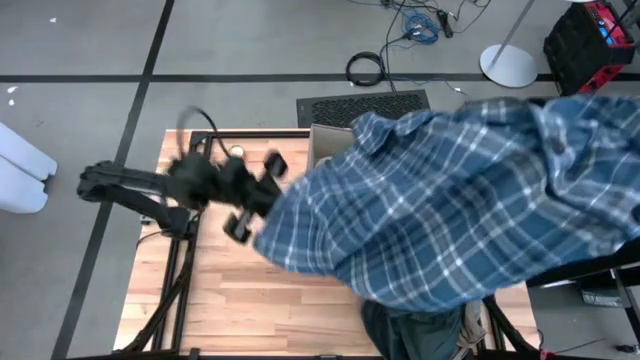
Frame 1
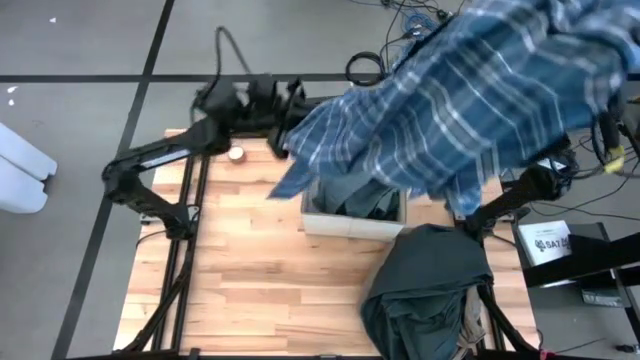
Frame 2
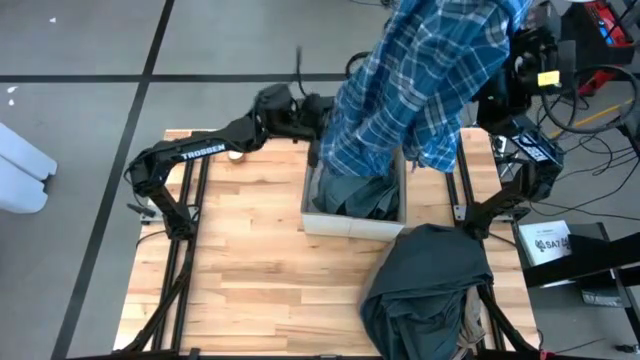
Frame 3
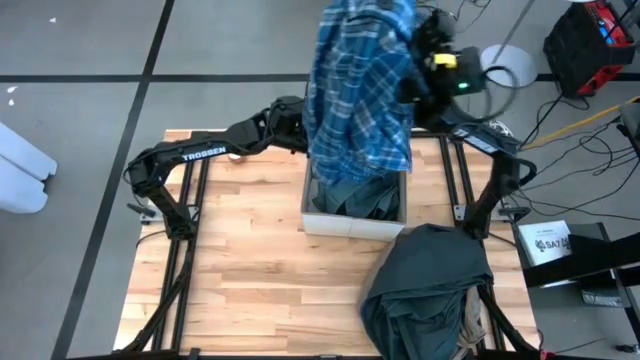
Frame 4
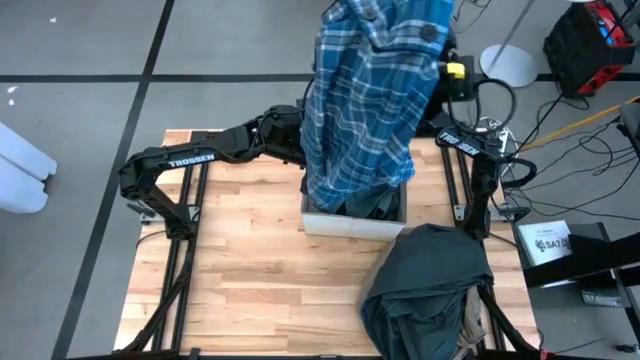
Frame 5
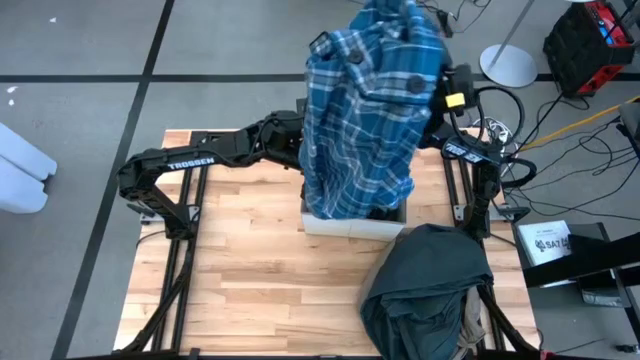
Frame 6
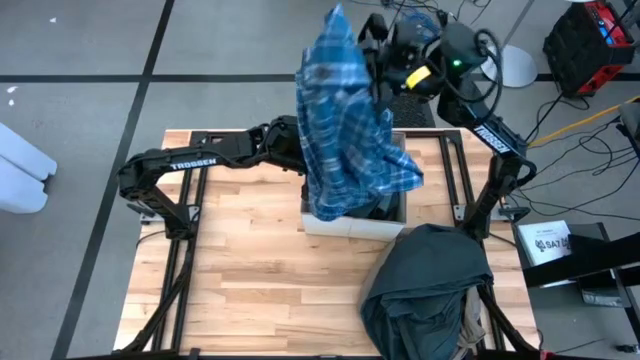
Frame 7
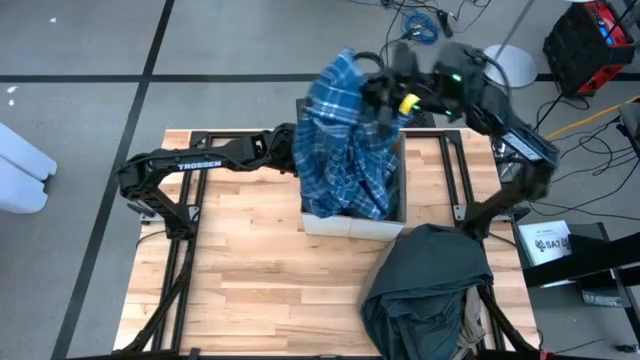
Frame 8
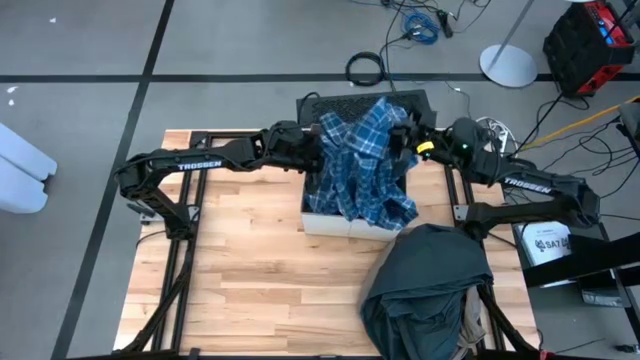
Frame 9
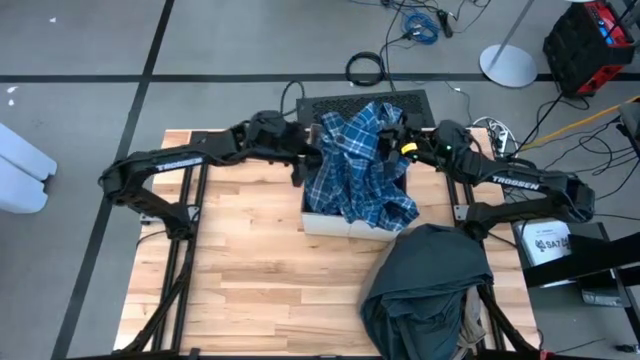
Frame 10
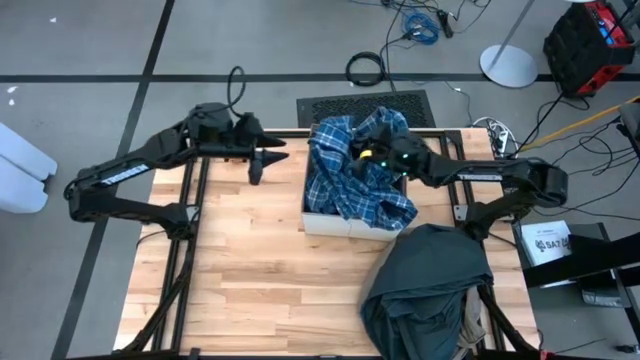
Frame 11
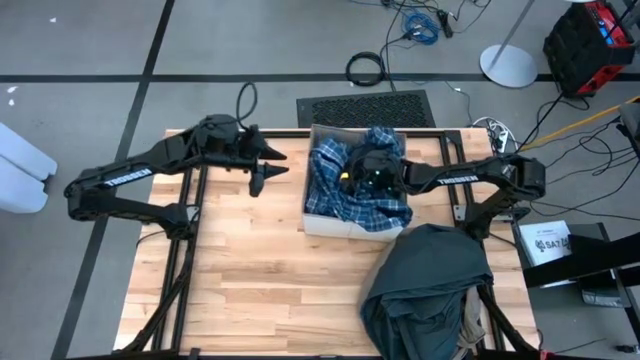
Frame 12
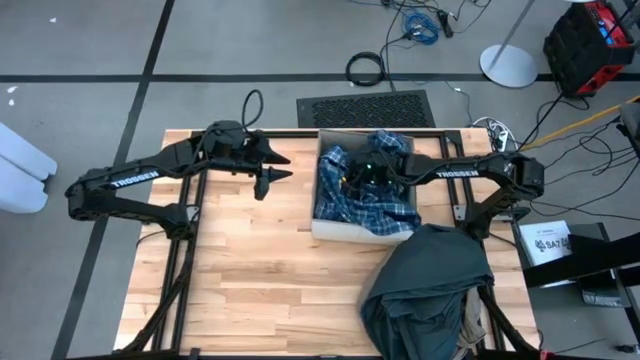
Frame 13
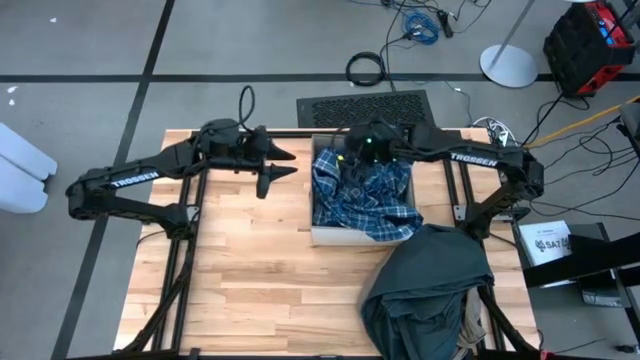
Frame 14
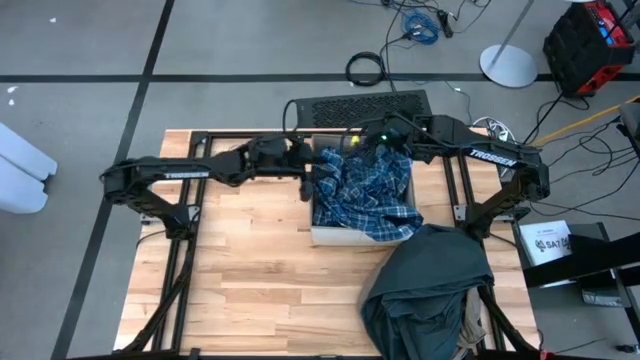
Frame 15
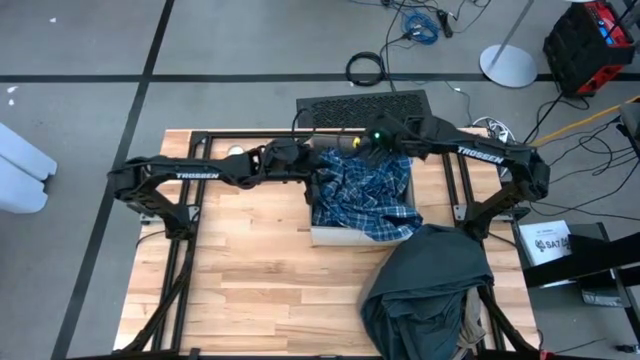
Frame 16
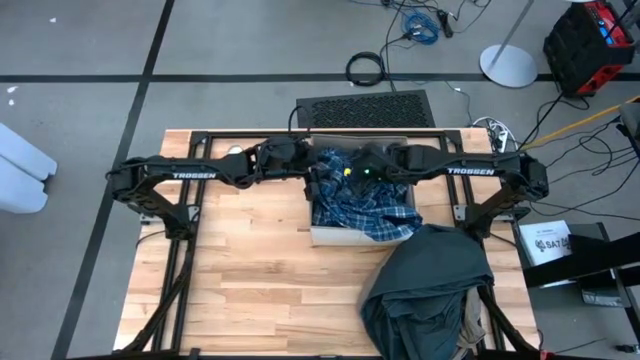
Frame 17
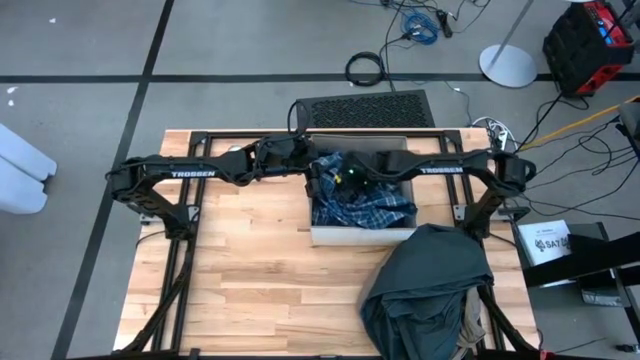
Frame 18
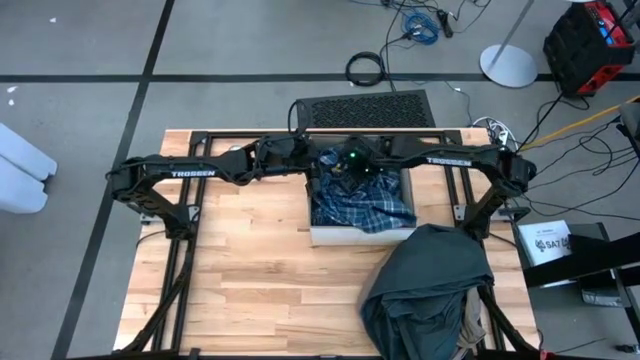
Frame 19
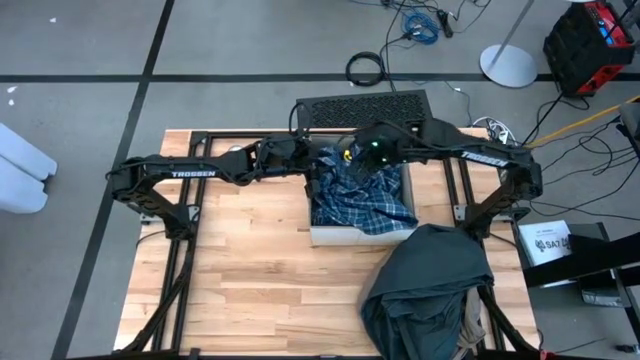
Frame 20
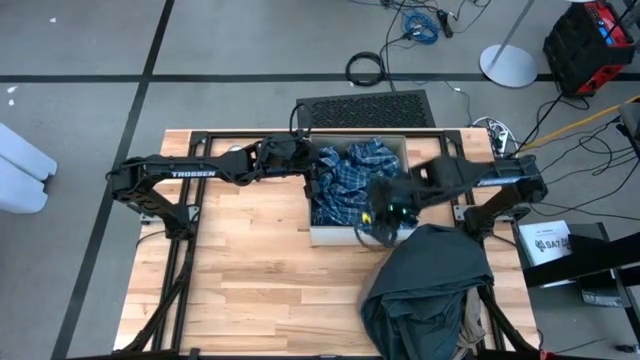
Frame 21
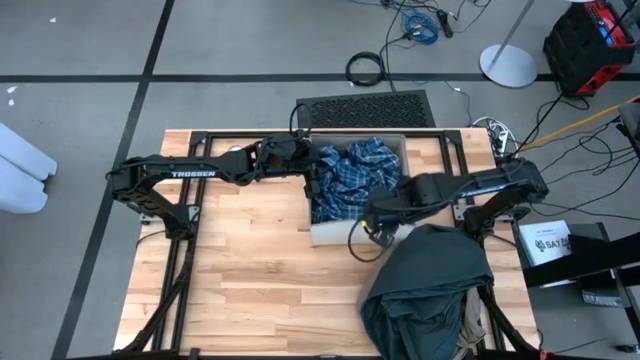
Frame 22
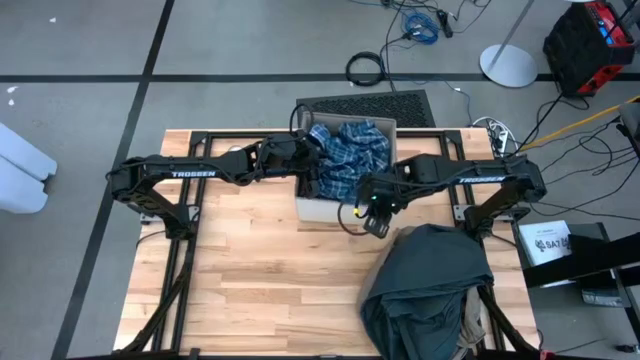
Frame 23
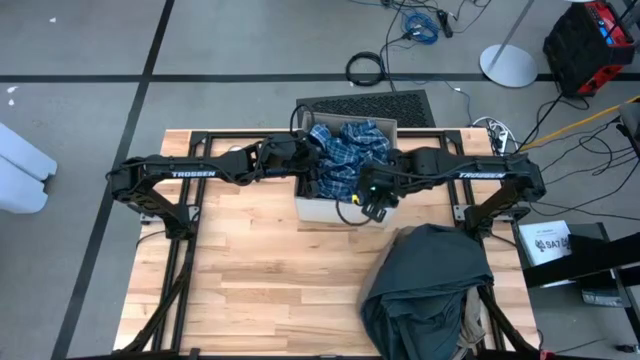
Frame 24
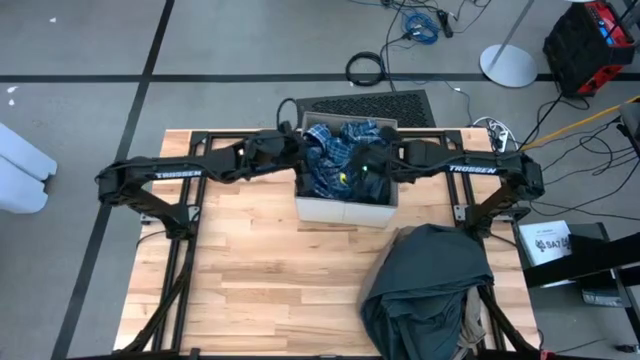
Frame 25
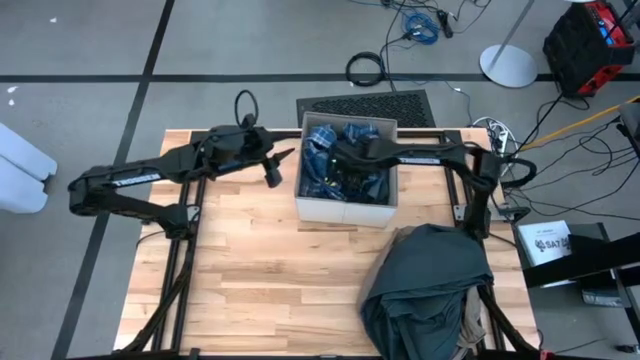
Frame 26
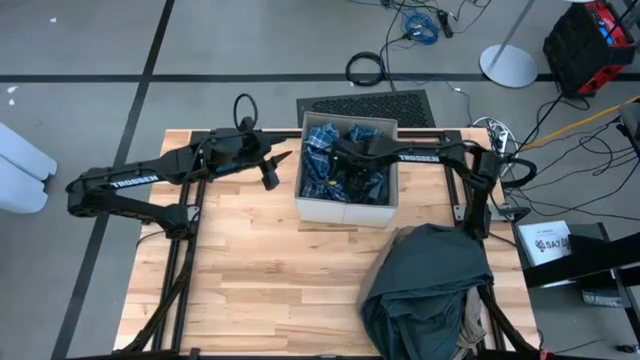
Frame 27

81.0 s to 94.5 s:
Task: Sort clothes
Put the blue plaid shirt into the laundry organizer
